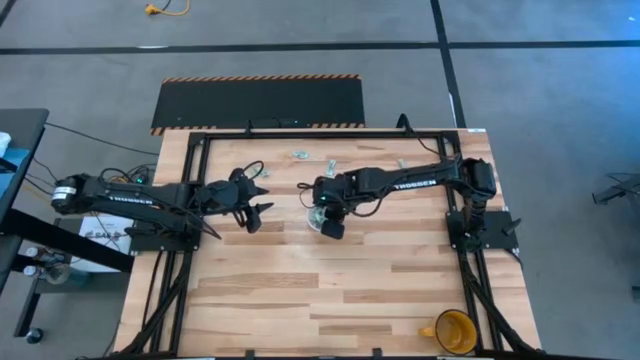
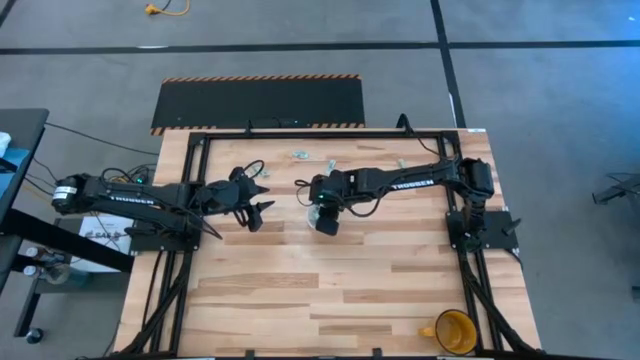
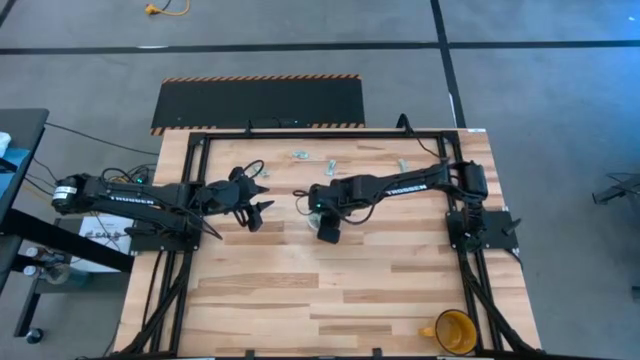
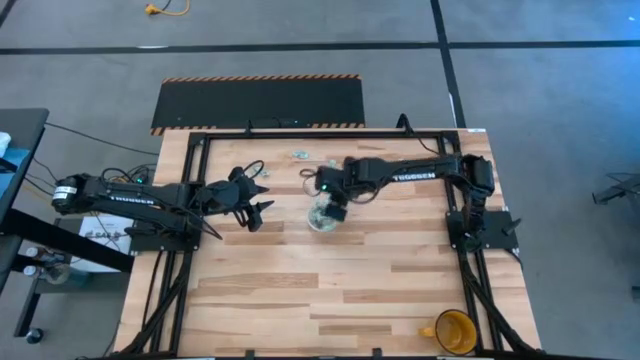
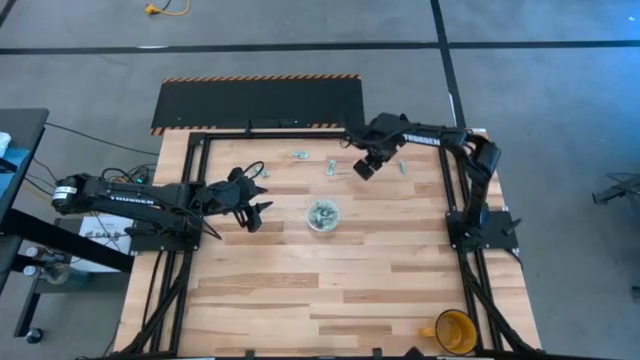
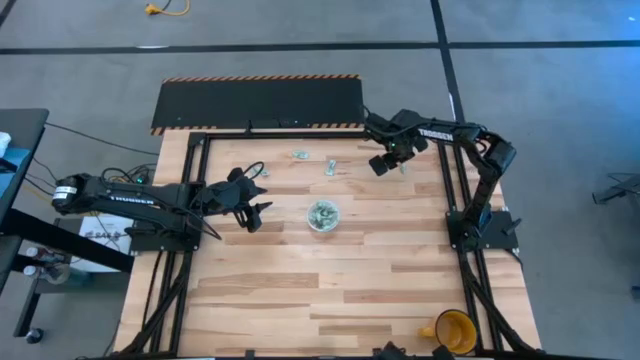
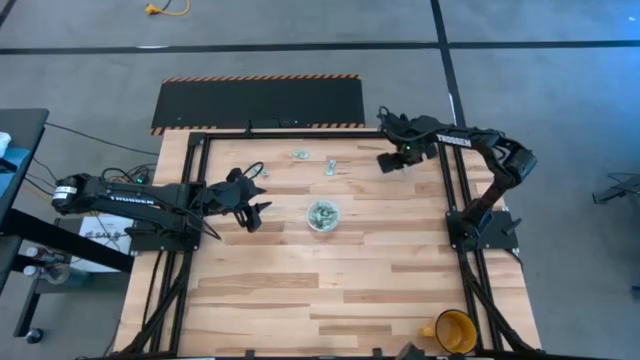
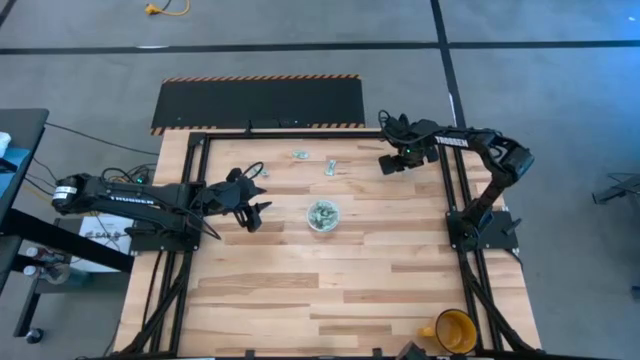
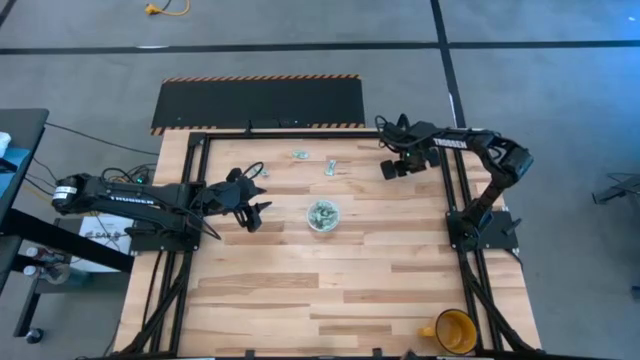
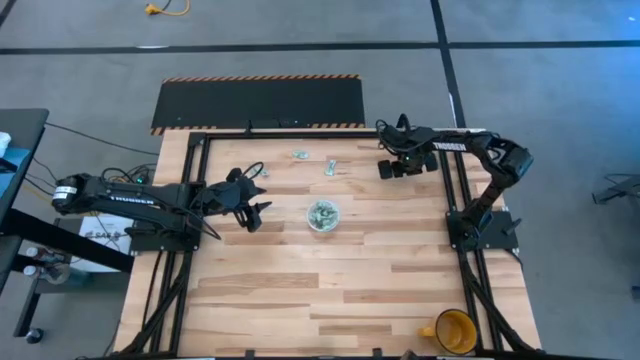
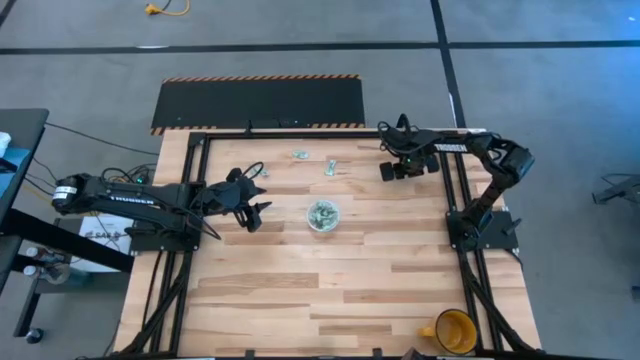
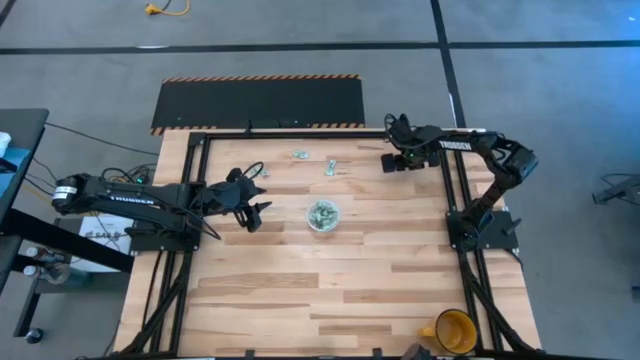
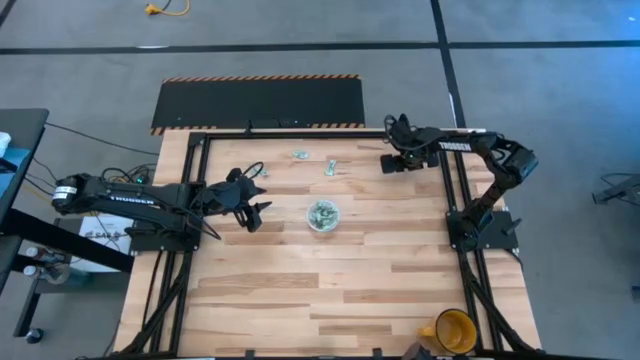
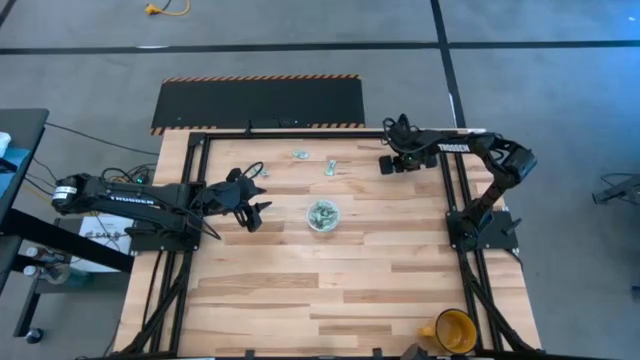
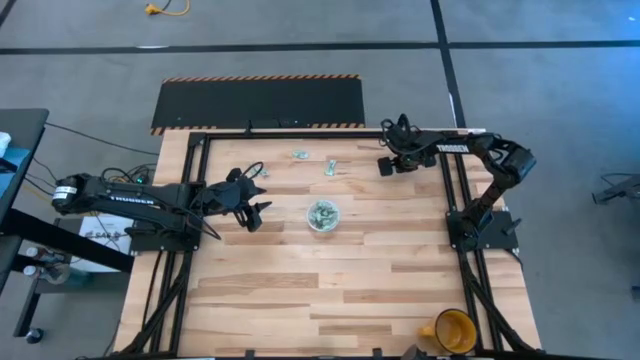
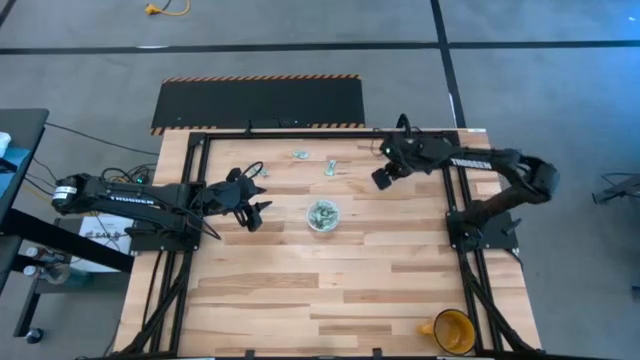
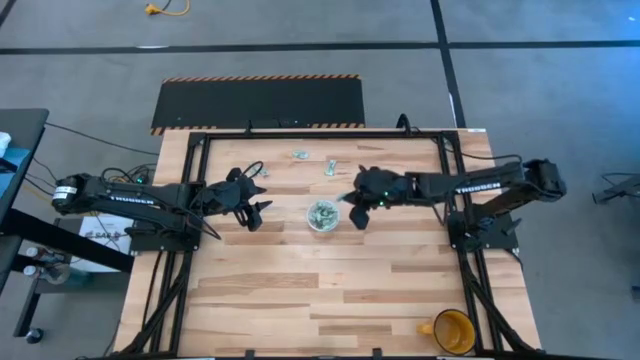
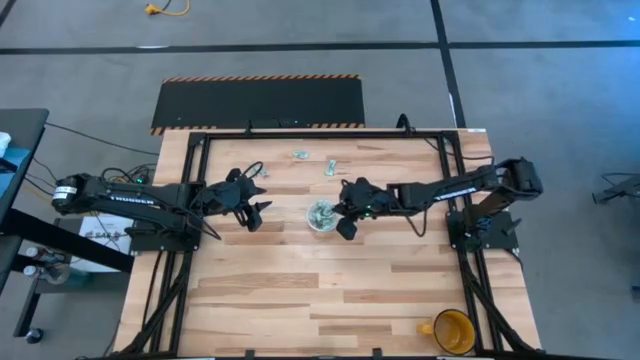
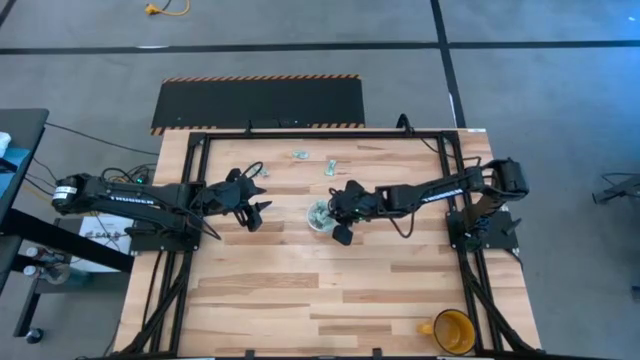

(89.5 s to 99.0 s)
Task: Pick and place Stevia / Truvia into bins
Put the green stevia packet into the transparent container

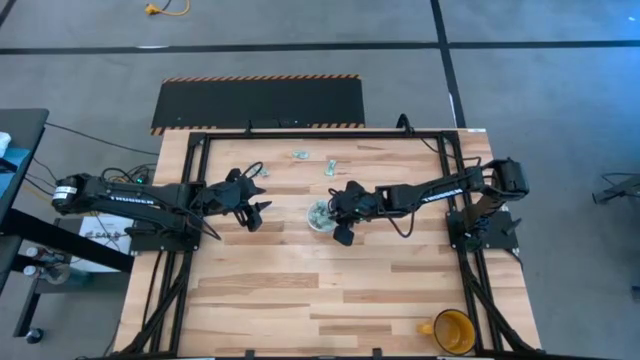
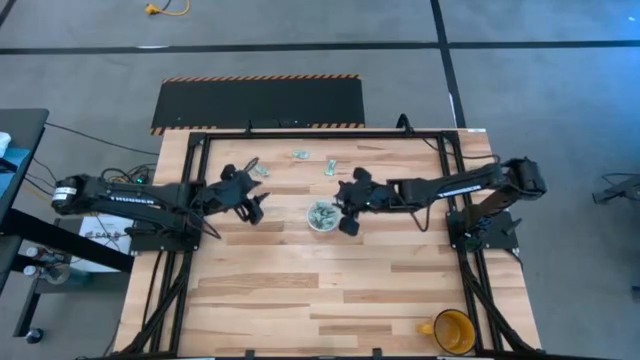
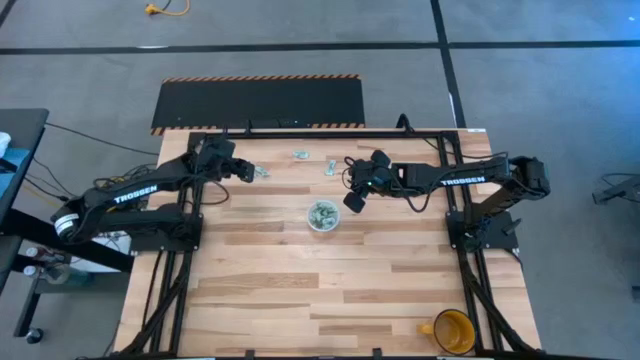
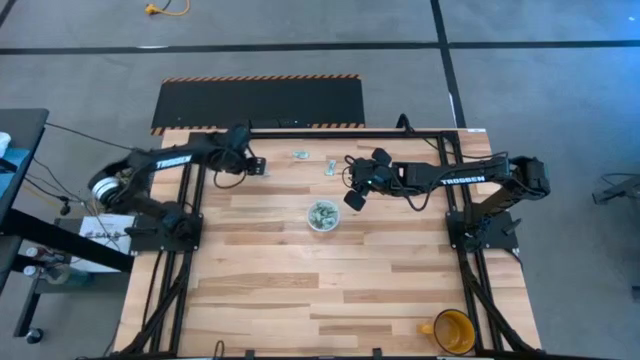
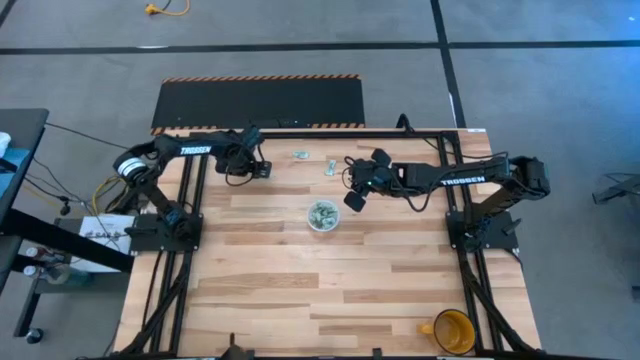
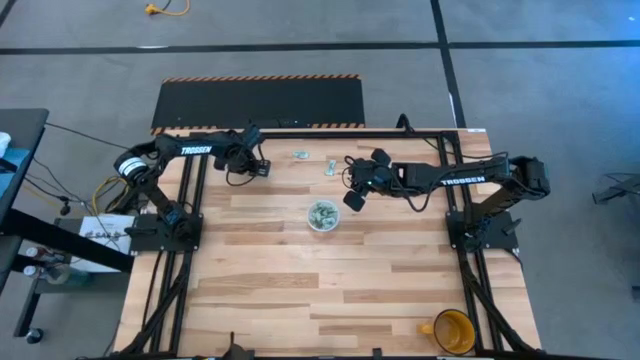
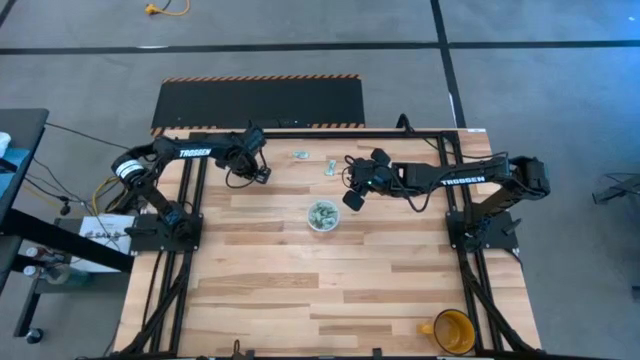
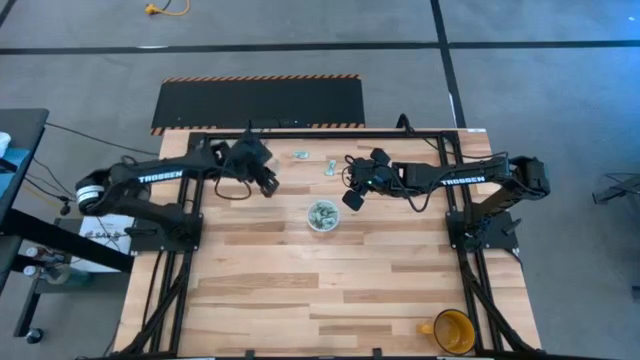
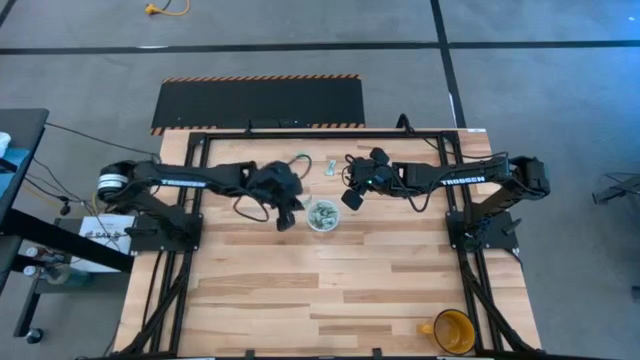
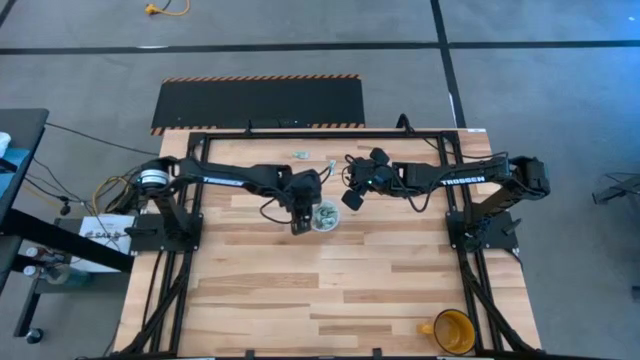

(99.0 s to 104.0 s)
Put the green stevia packet into the transparent container

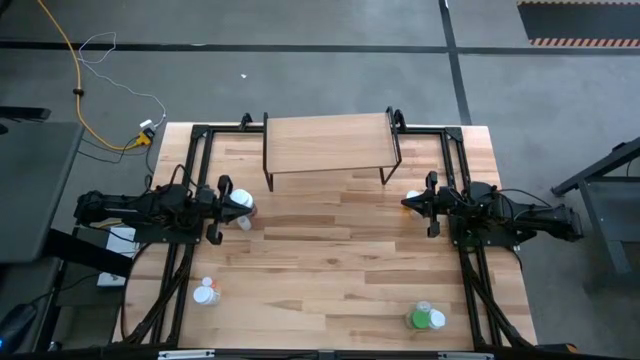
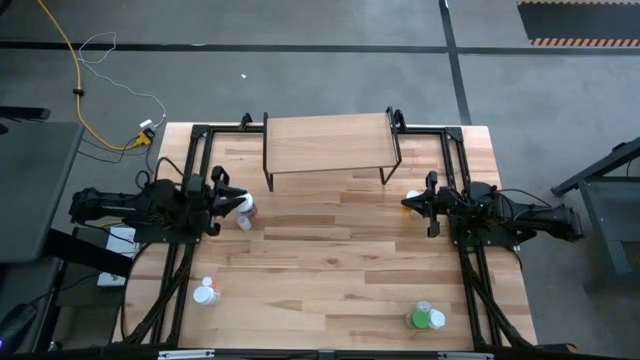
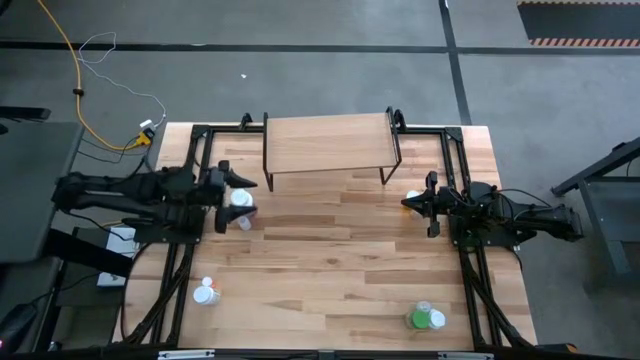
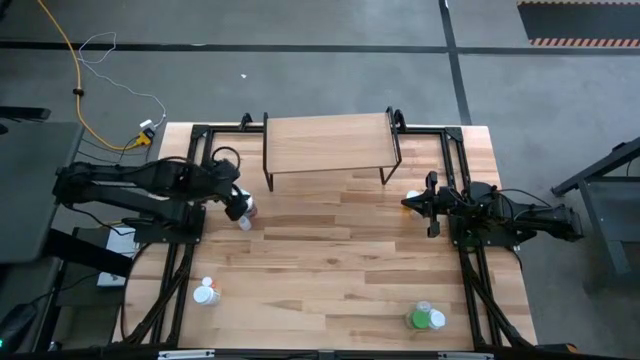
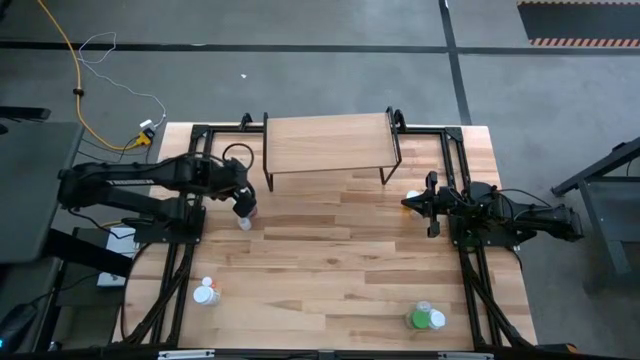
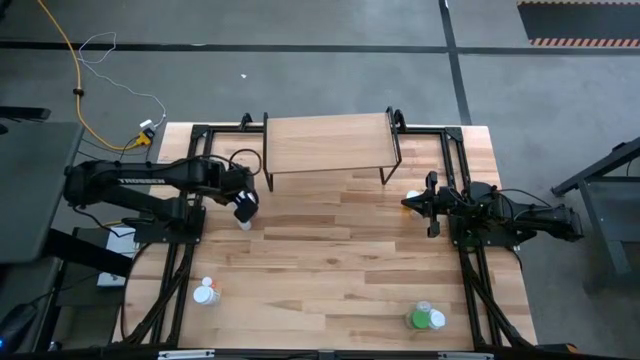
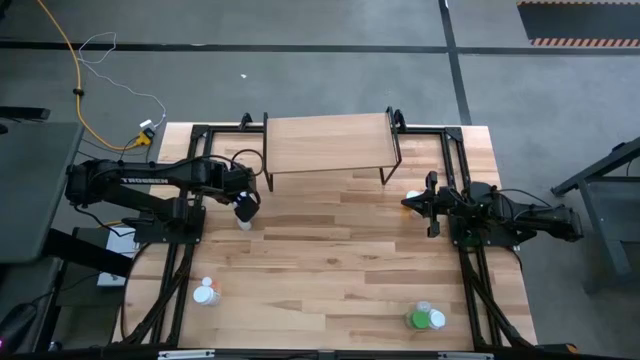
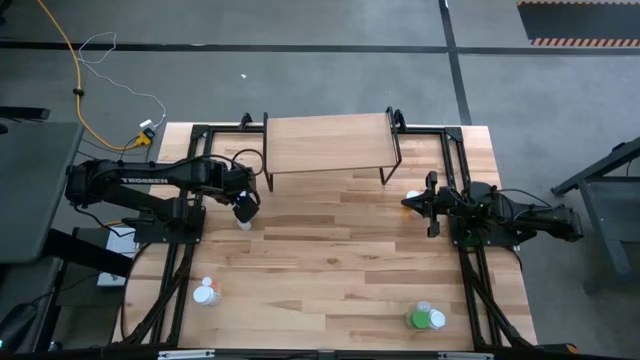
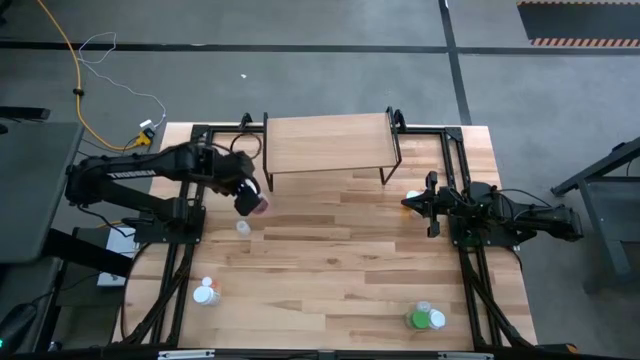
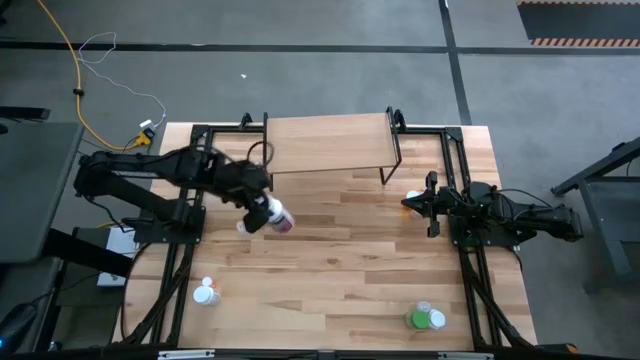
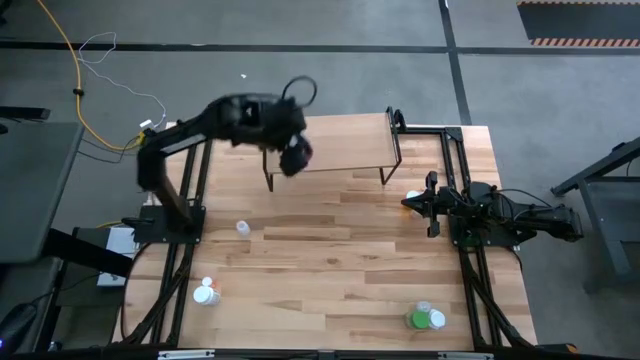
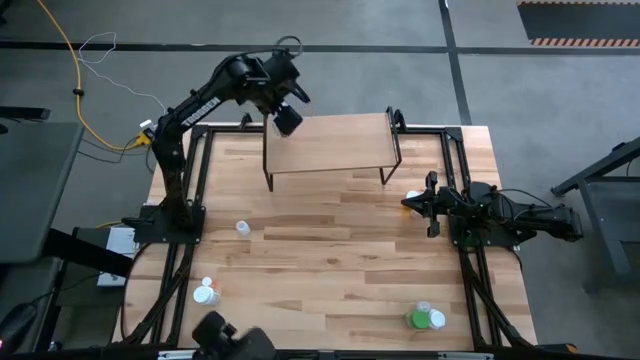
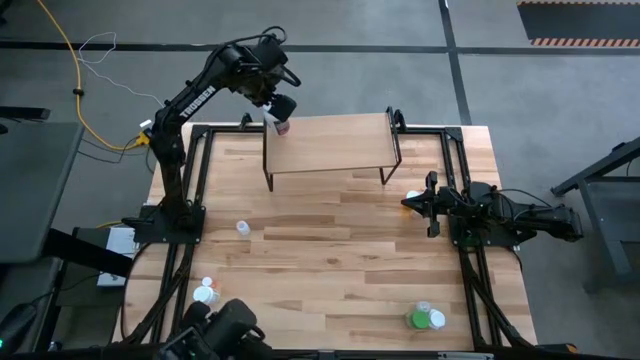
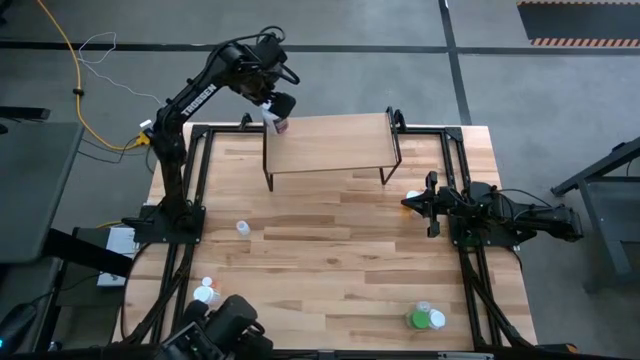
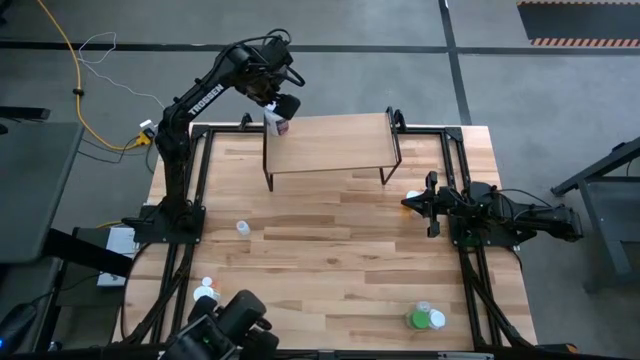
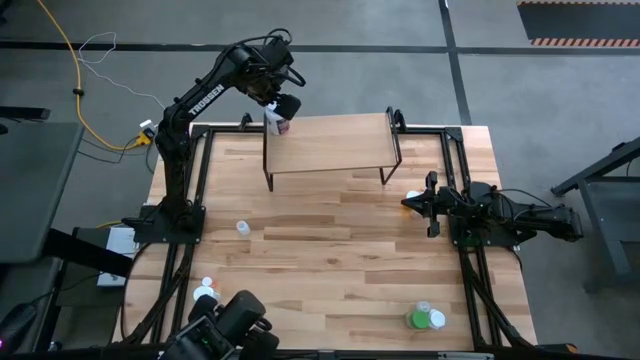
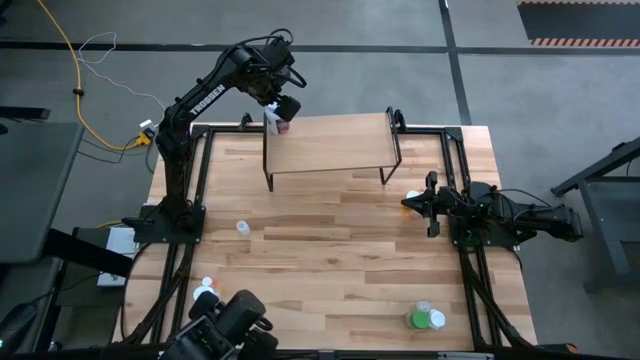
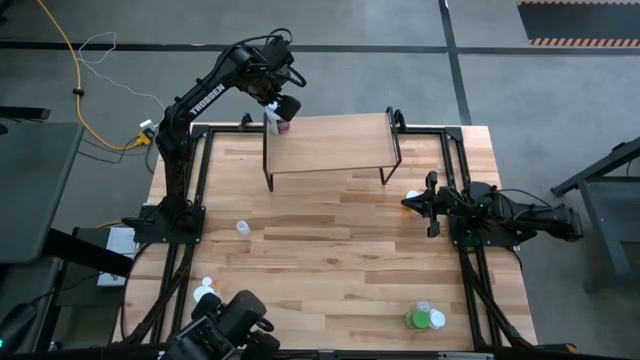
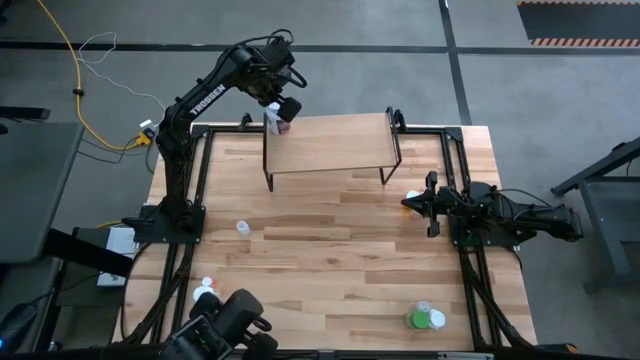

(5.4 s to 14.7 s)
Task: Pick and place medicine bottles onto shelf by color
Put the white purple pill bottle on the shelf
